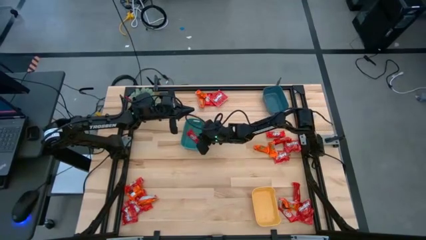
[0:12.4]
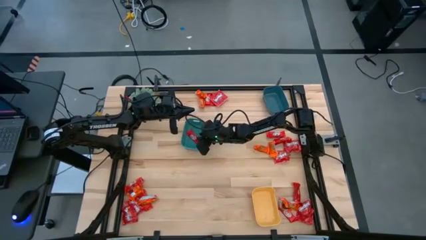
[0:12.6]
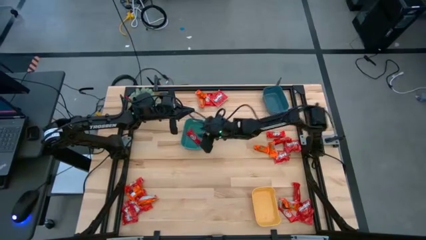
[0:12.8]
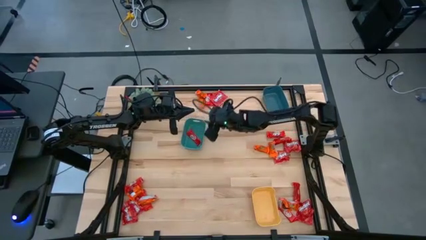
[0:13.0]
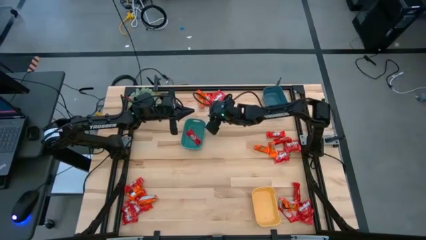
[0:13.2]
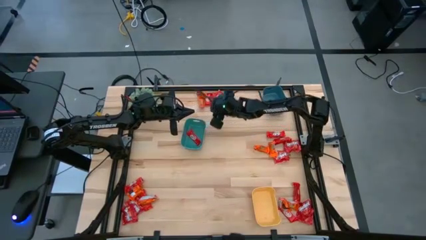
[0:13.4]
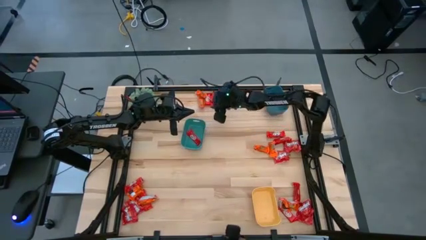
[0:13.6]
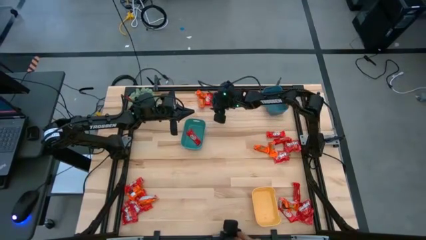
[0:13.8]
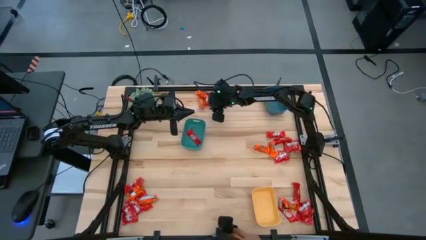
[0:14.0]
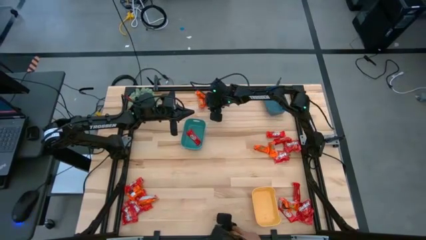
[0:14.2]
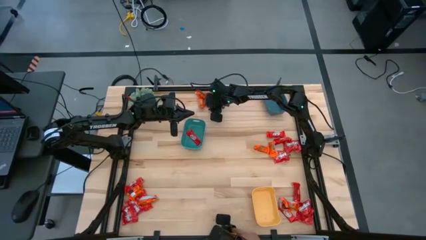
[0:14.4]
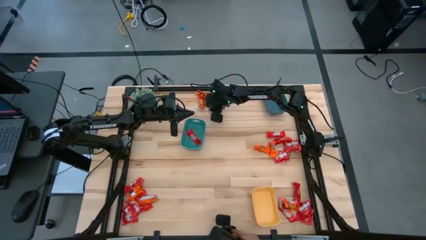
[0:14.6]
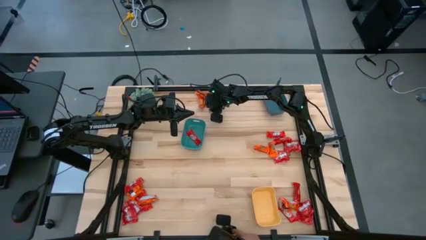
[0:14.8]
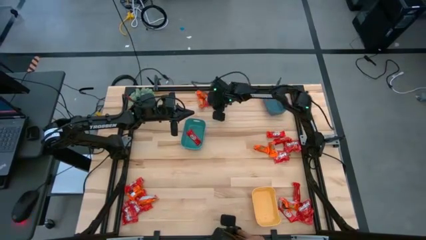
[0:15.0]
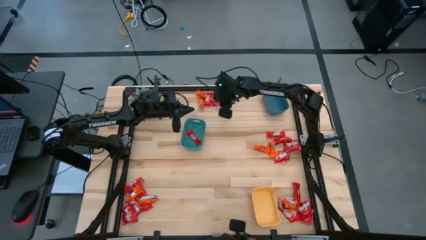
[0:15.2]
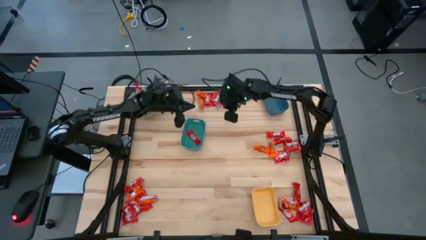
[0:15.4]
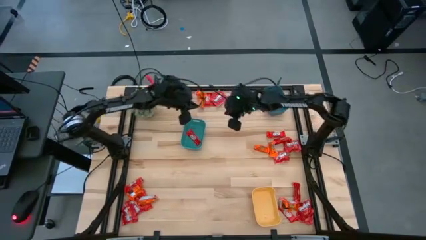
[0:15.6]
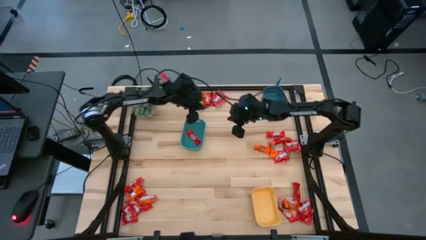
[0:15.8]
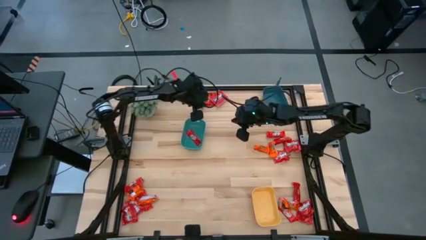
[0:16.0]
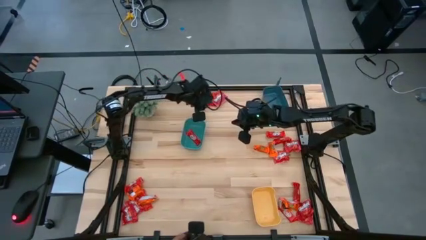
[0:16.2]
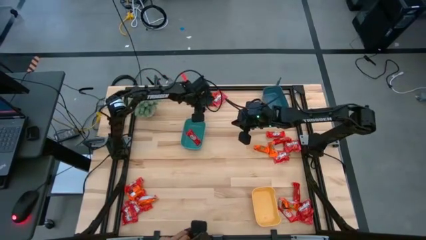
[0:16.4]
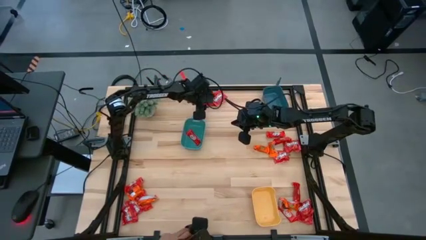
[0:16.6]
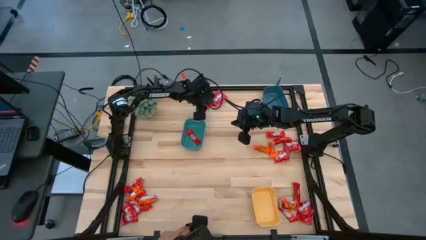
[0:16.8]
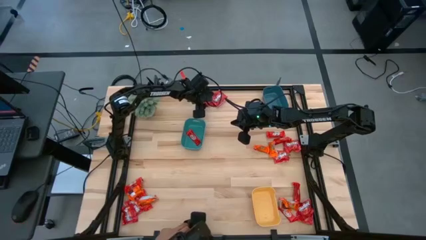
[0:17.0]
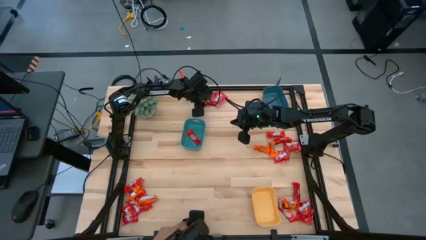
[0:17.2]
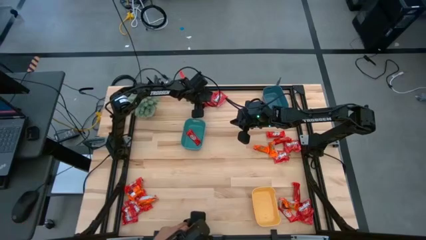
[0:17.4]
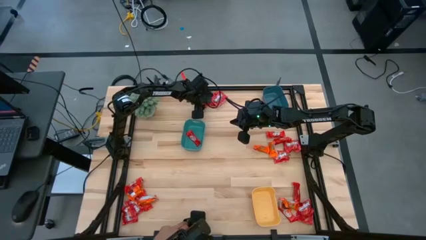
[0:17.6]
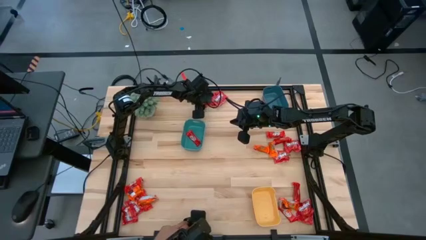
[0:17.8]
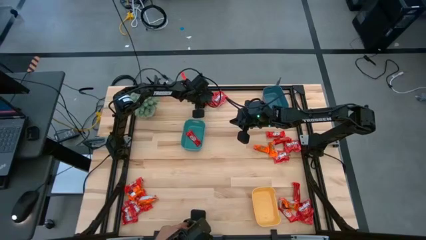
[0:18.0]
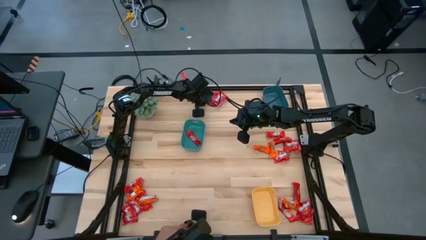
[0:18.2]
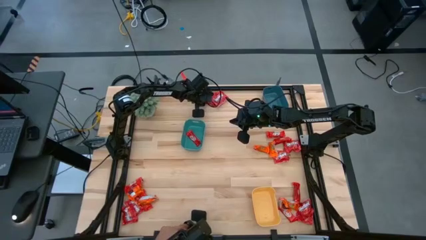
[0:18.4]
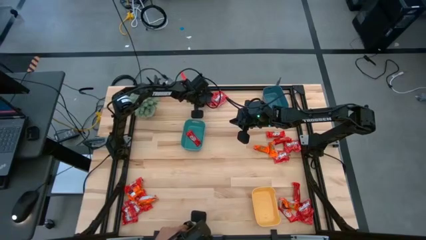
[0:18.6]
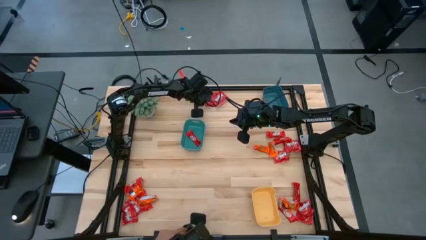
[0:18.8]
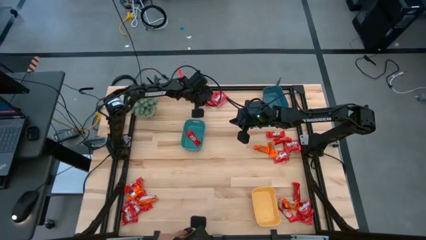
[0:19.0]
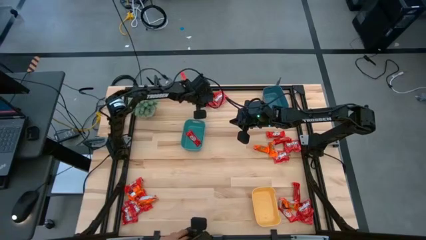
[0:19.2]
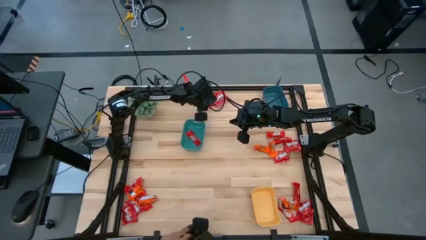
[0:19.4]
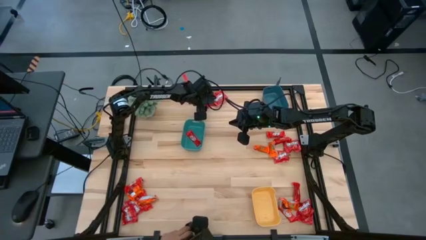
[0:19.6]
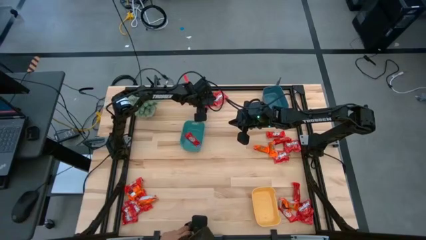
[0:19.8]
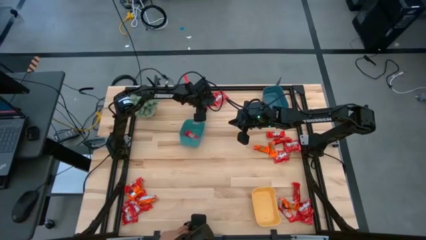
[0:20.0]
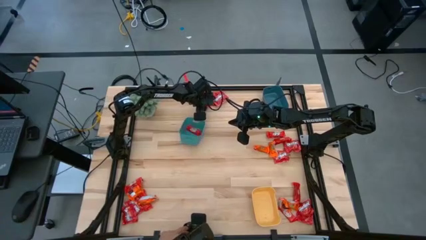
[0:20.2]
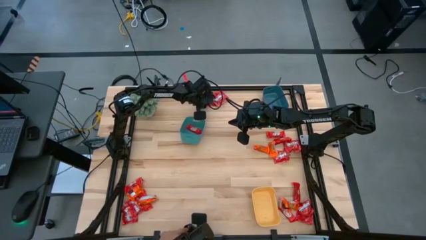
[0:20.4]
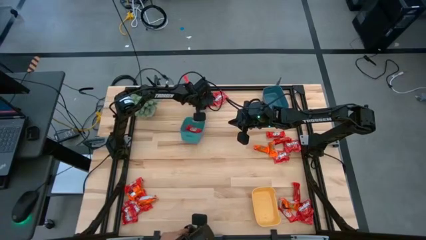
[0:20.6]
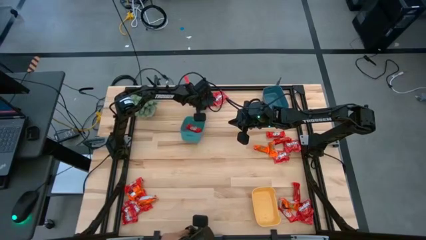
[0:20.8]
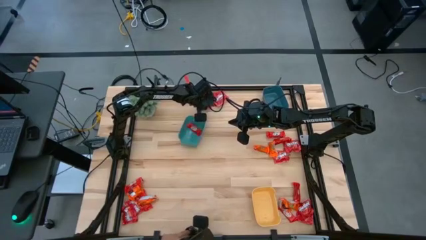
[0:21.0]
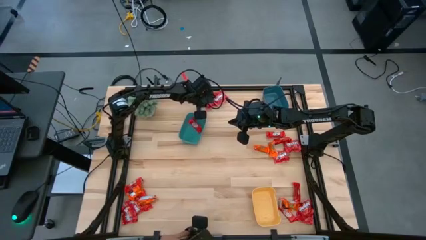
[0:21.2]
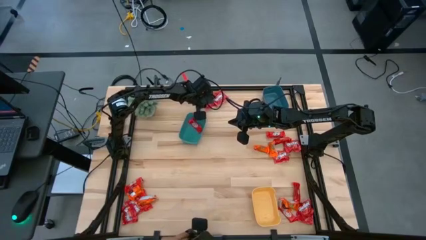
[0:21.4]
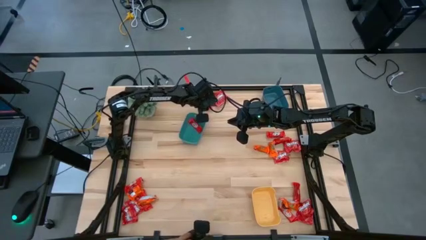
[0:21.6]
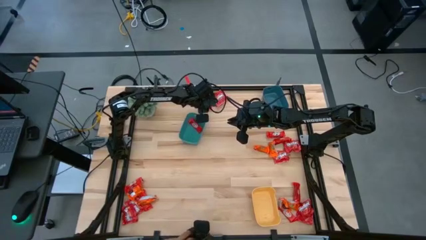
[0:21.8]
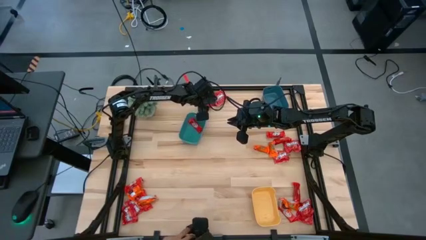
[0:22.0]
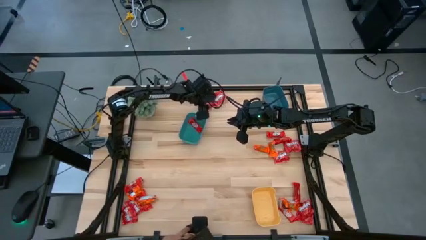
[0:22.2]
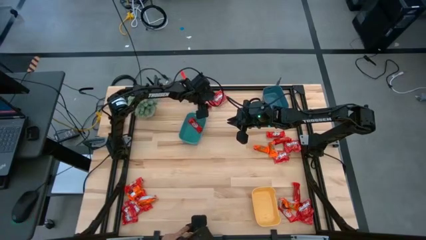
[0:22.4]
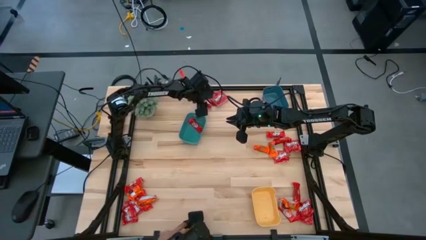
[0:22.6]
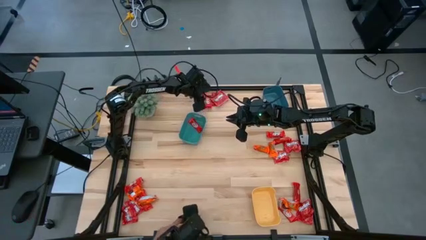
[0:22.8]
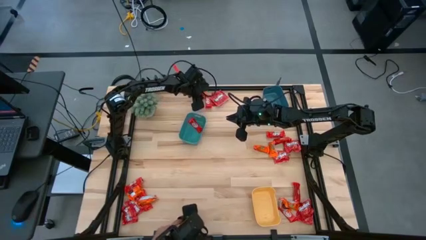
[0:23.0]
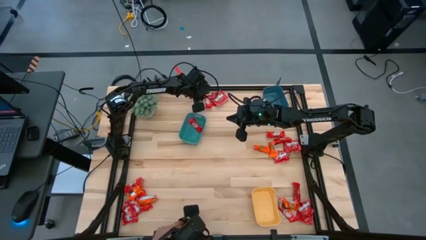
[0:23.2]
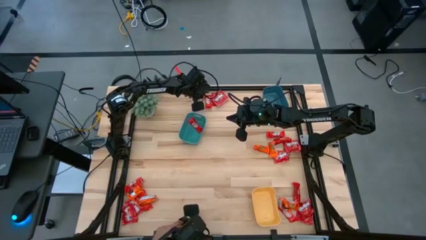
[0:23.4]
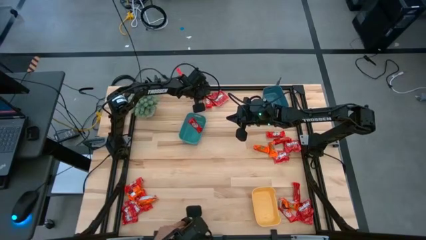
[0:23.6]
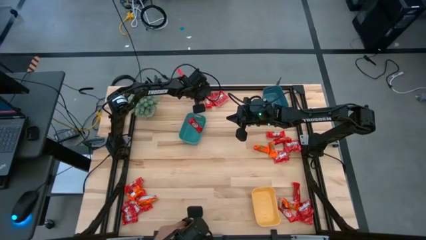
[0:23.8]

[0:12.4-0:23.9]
Task: Sort candy
Put the small red candy into the green bin

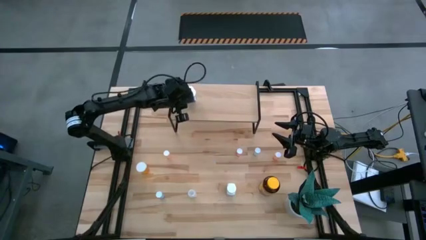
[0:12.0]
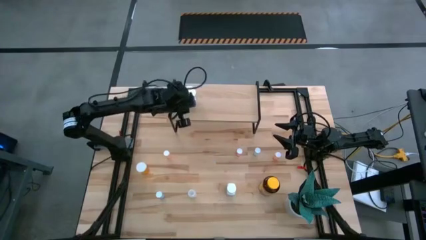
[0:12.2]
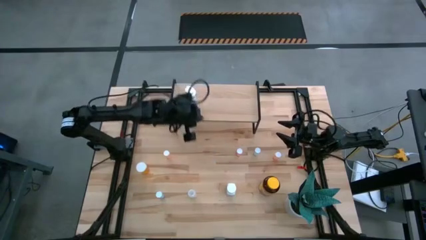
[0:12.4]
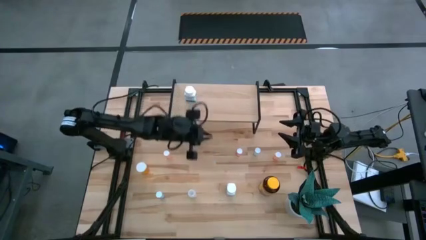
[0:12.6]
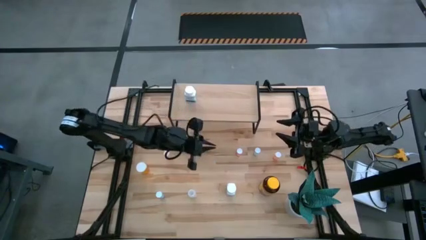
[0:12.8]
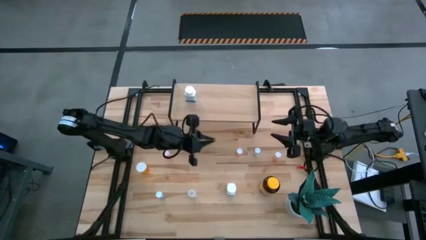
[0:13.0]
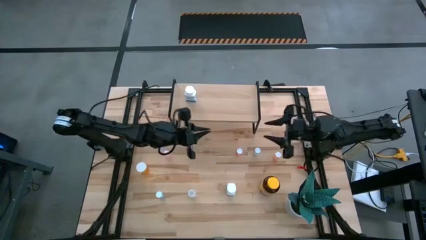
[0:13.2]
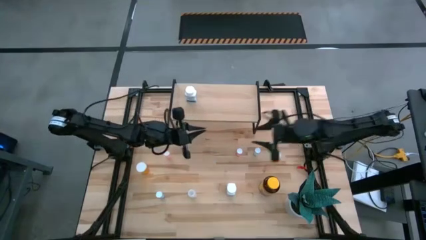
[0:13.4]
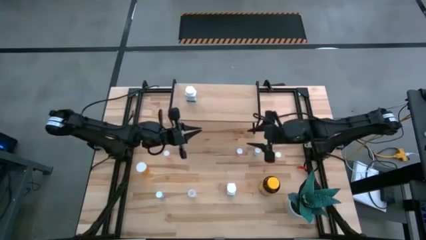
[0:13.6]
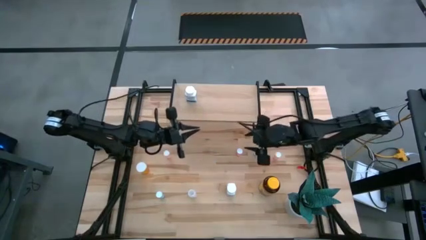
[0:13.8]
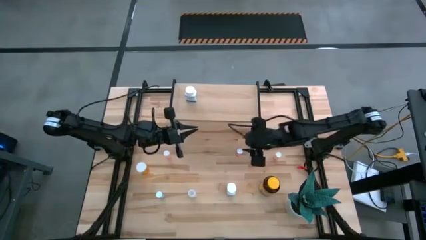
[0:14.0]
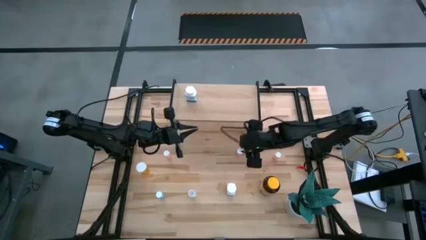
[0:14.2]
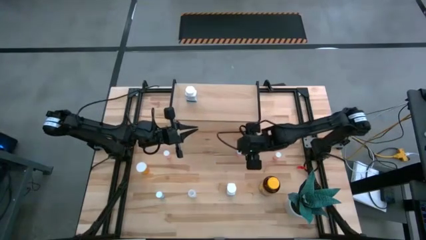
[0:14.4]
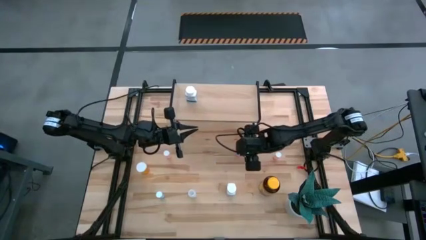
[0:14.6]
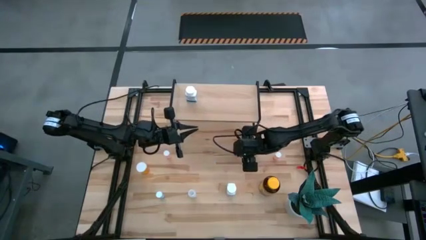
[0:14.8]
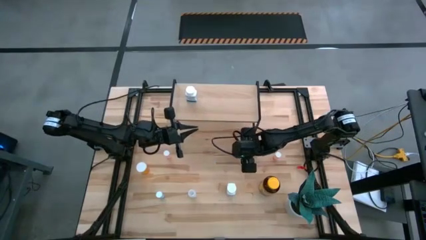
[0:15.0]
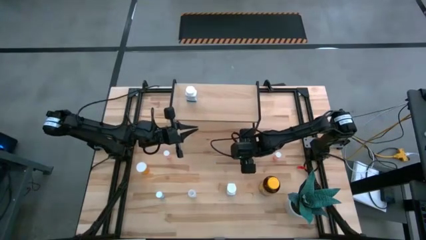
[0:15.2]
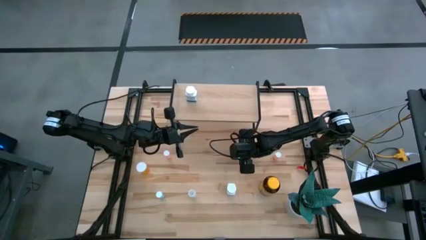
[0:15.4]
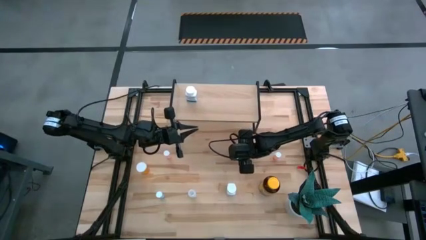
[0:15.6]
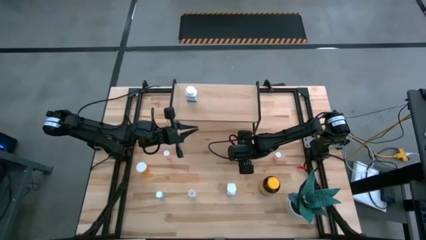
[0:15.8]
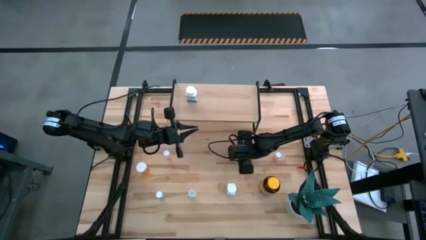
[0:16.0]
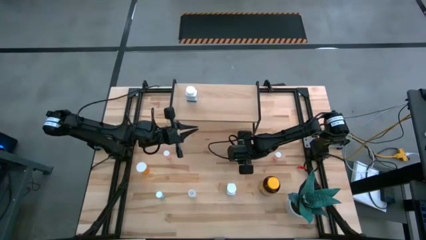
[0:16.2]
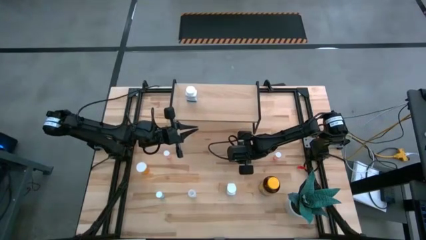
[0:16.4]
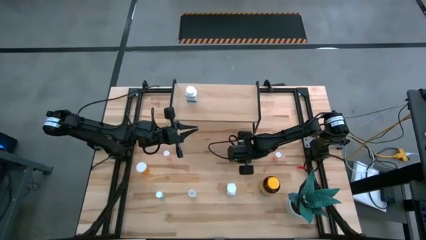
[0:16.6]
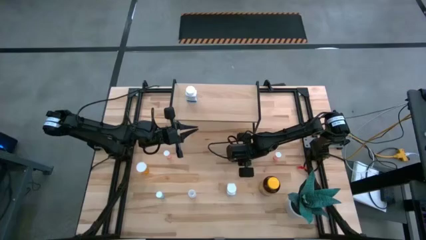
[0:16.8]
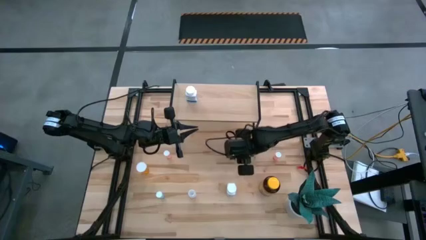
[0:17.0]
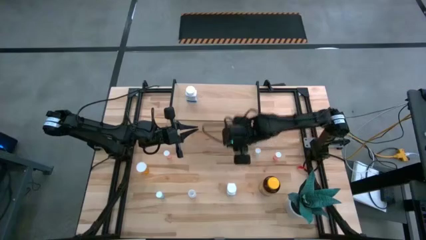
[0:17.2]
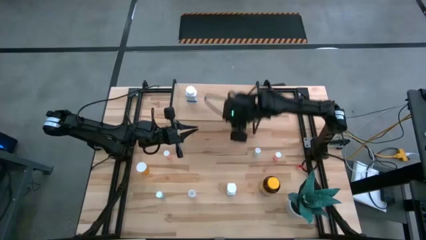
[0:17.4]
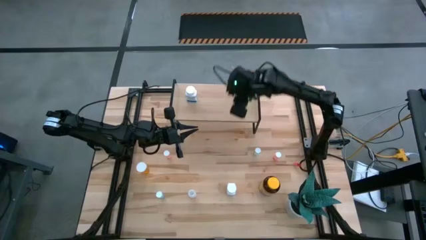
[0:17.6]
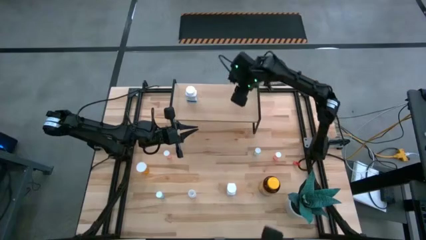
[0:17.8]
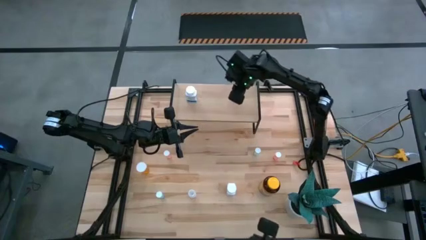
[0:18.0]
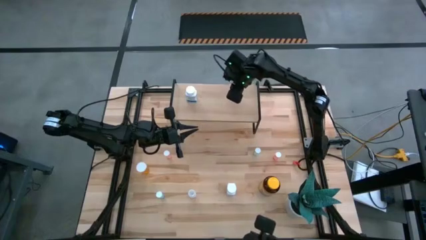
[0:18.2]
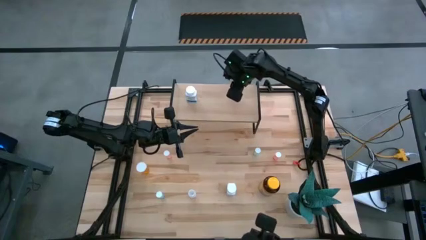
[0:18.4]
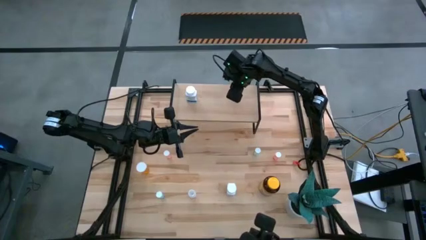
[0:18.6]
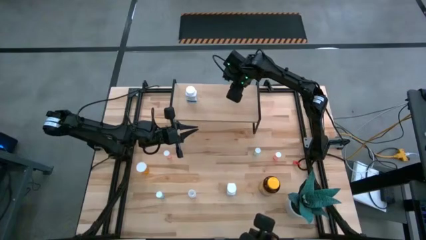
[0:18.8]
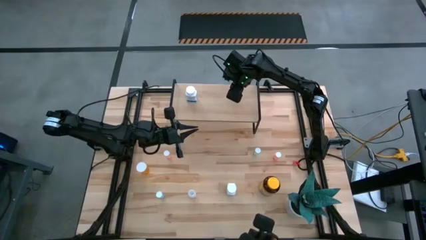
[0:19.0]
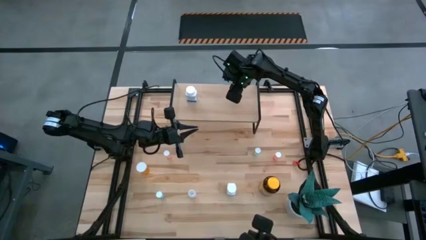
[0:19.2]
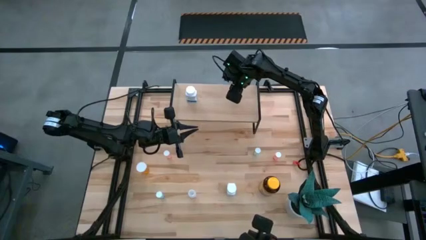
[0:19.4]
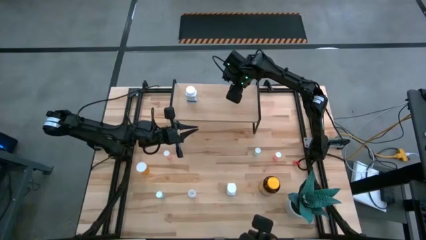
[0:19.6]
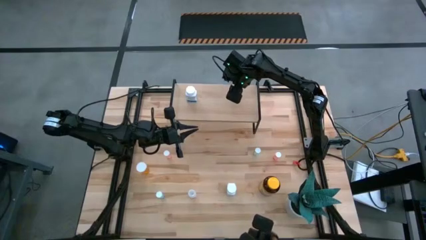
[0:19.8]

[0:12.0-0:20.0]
Task: Pick and place medicine bottles onto shelf by color
Put the middle red pill bottle from the top row on the shelf
